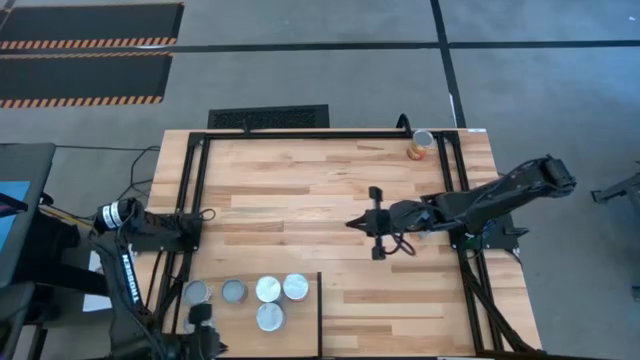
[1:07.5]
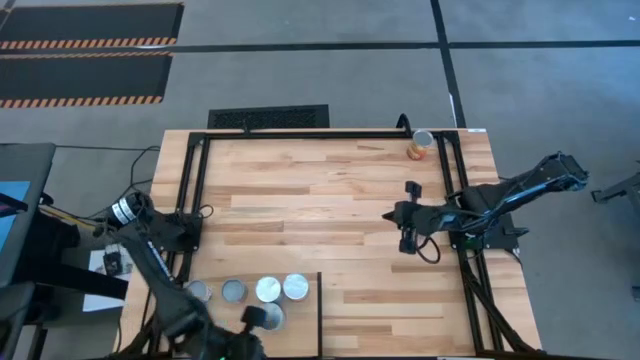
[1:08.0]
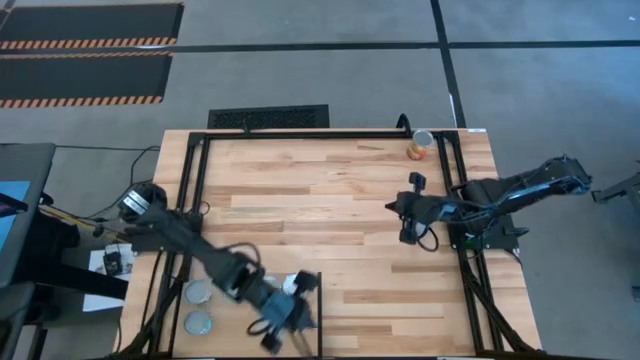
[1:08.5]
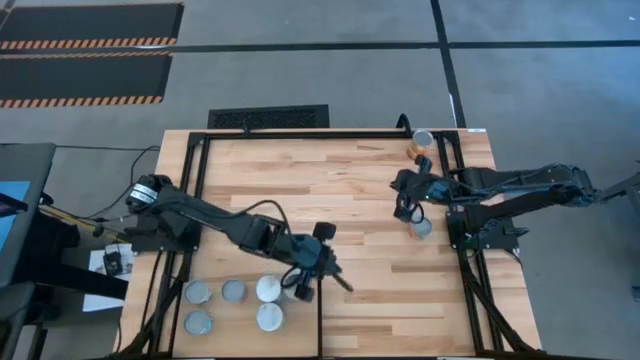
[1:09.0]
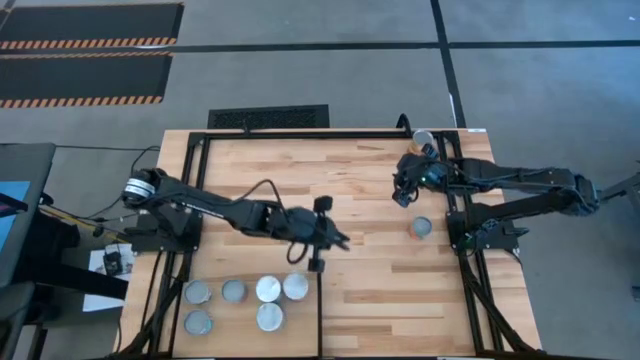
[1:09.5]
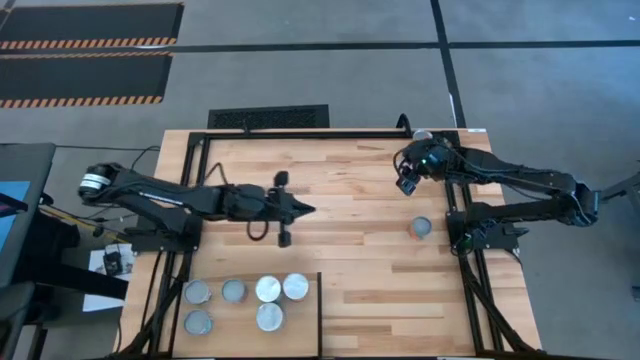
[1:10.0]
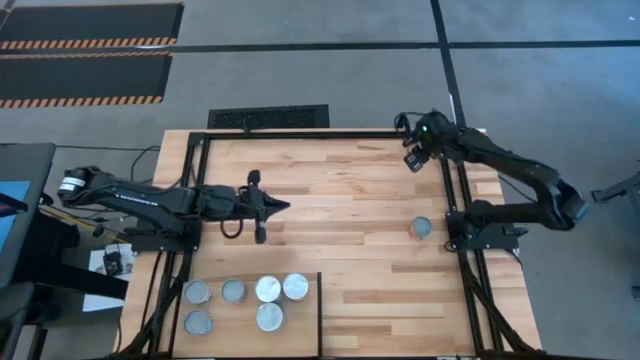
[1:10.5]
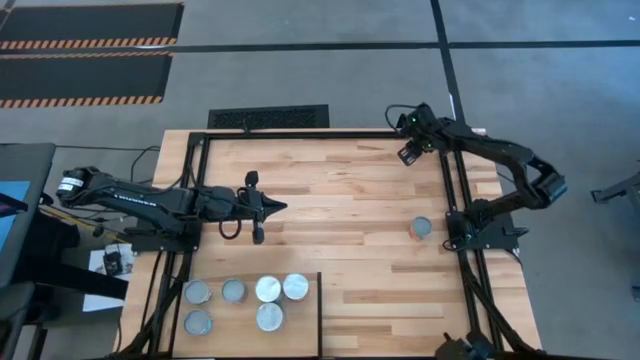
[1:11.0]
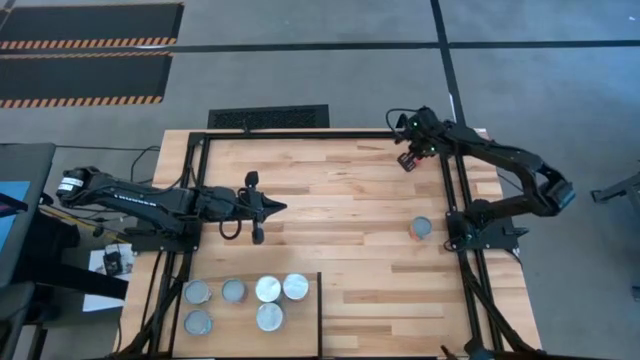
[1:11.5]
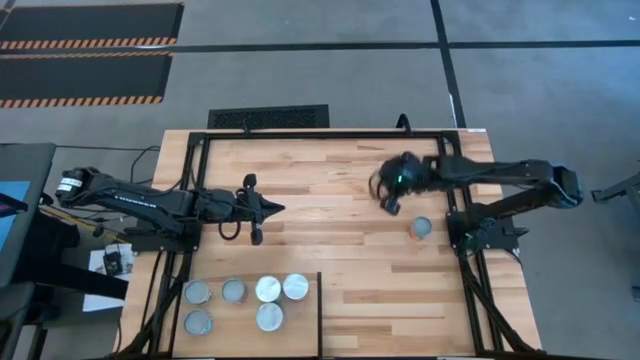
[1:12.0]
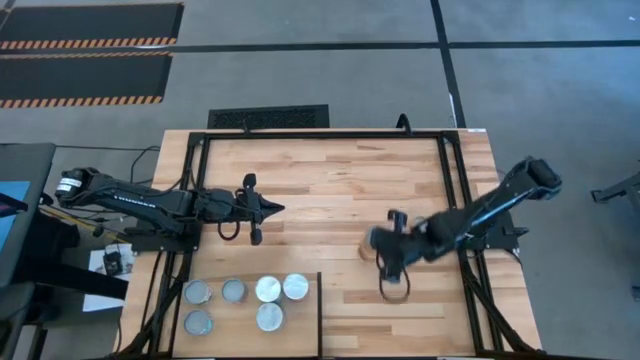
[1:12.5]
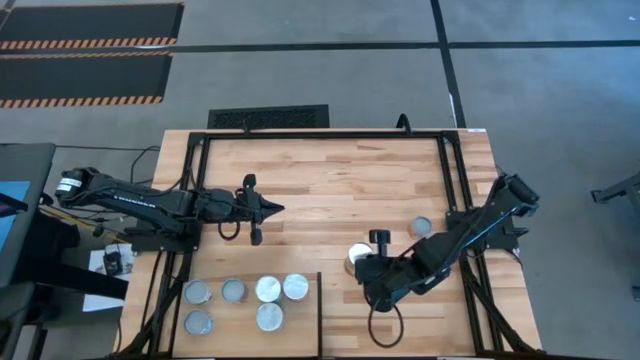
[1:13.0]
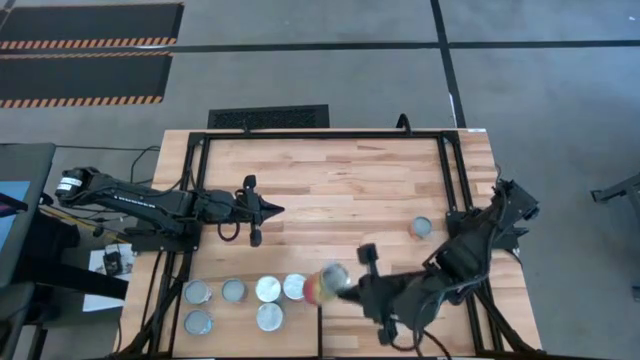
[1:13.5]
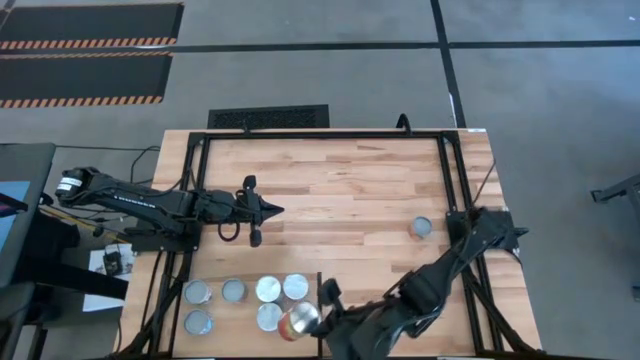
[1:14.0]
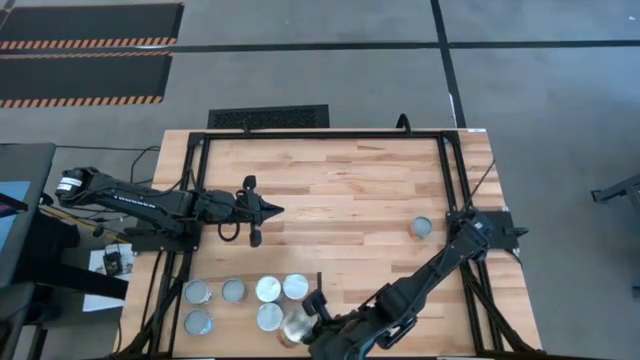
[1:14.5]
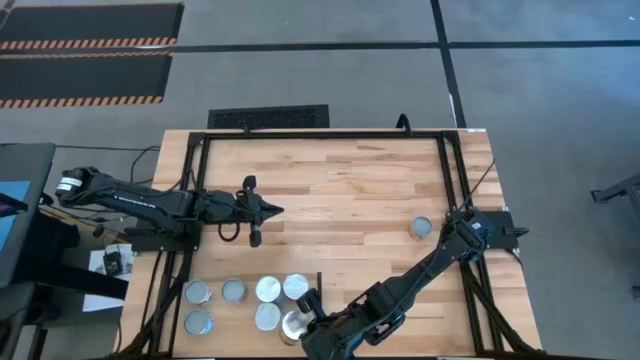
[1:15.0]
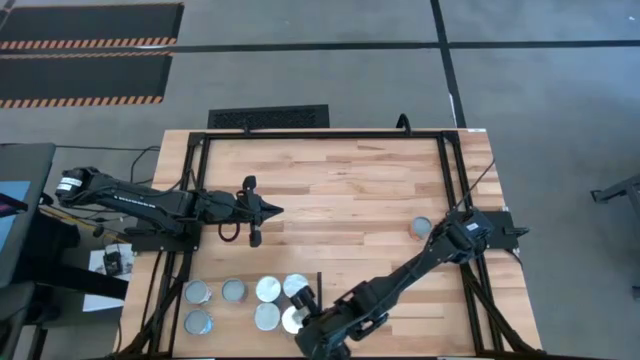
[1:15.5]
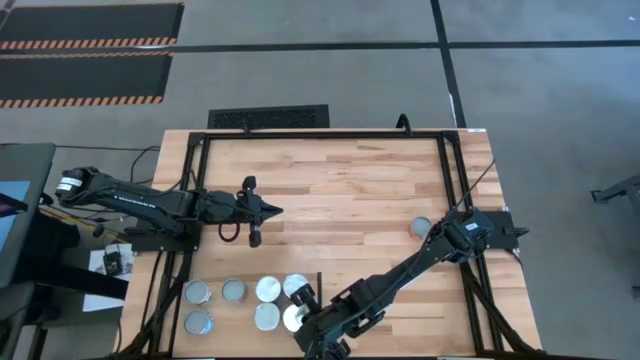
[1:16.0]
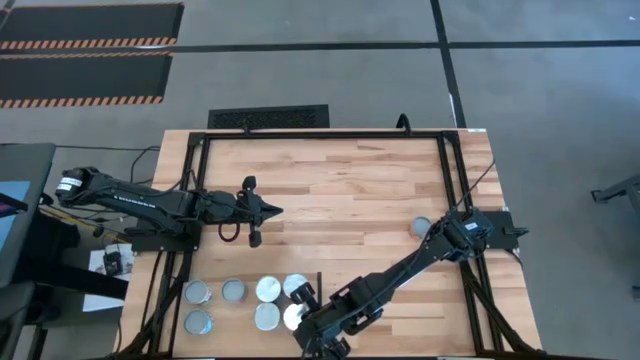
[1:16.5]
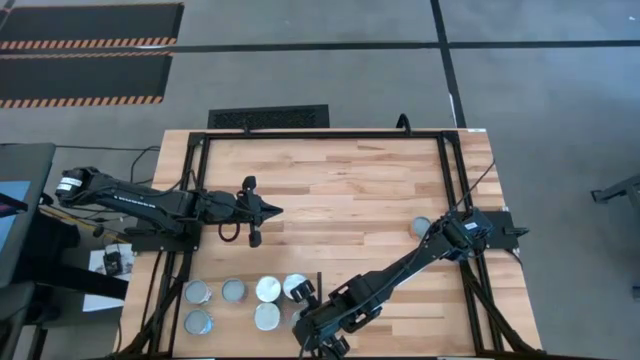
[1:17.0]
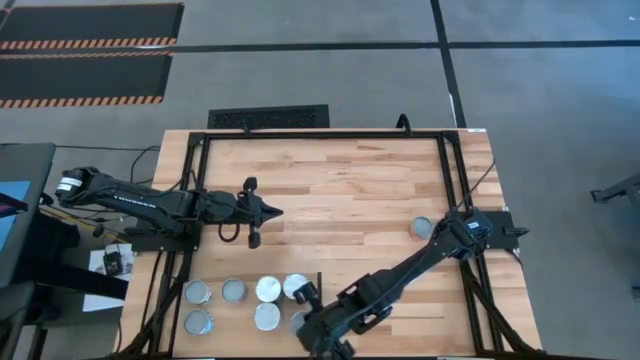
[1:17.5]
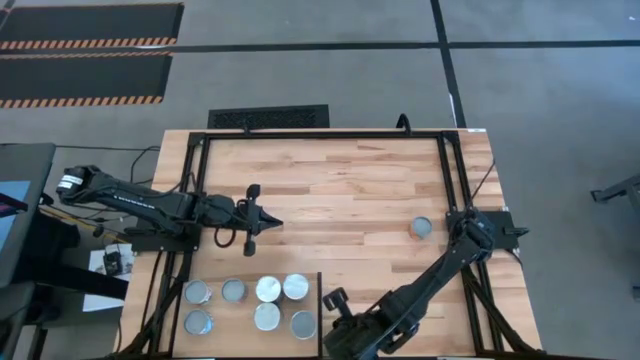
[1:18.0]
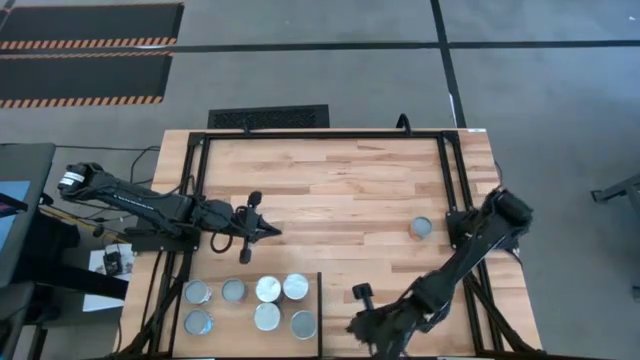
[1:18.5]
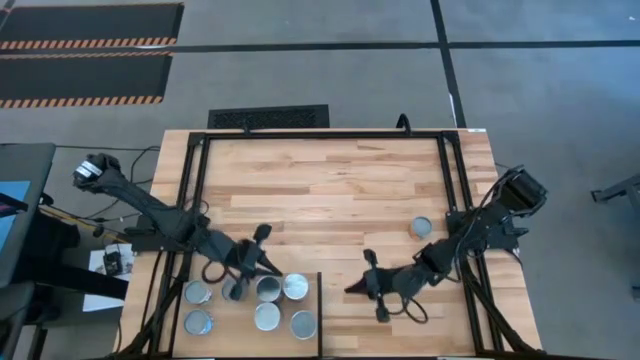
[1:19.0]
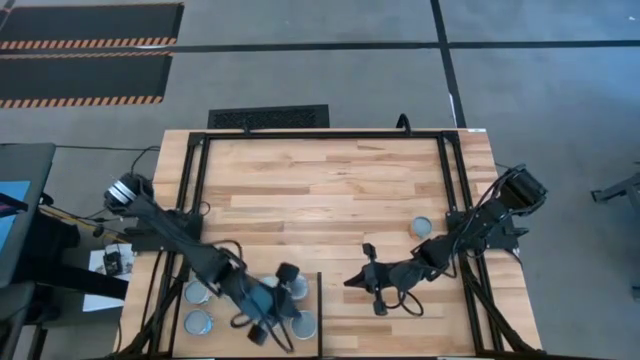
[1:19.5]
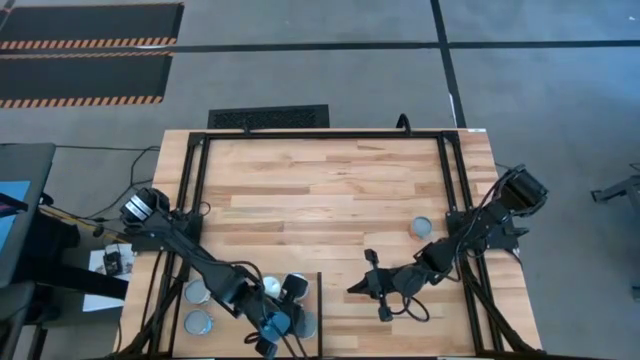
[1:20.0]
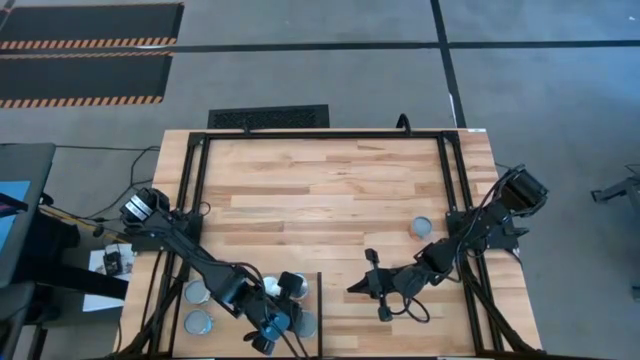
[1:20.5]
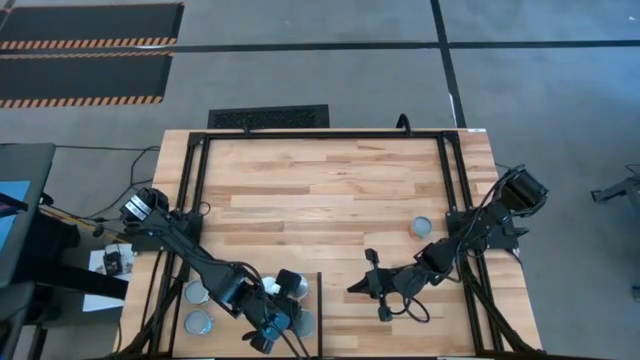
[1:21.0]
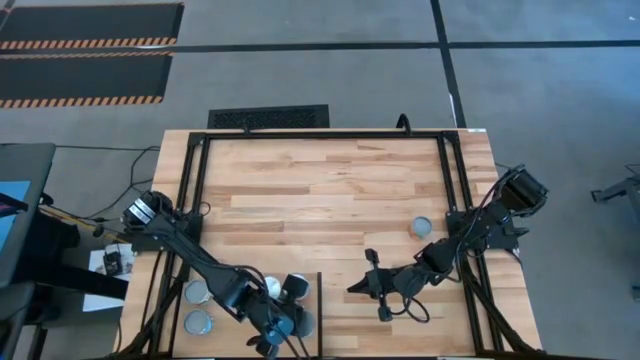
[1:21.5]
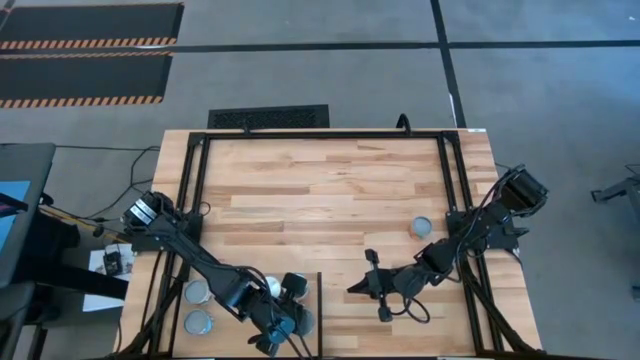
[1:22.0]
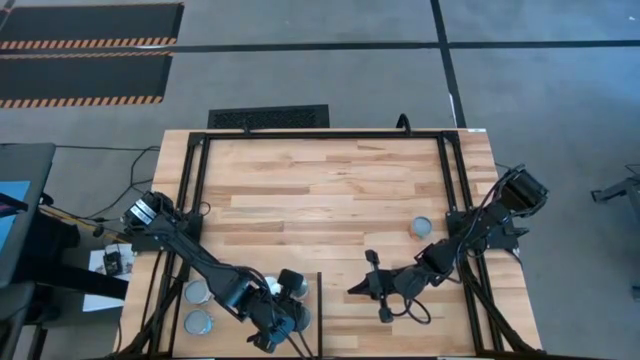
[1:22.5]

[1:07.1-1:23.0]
Task: Pick and place cans onto a shelf
Put the canned corn on the shelf

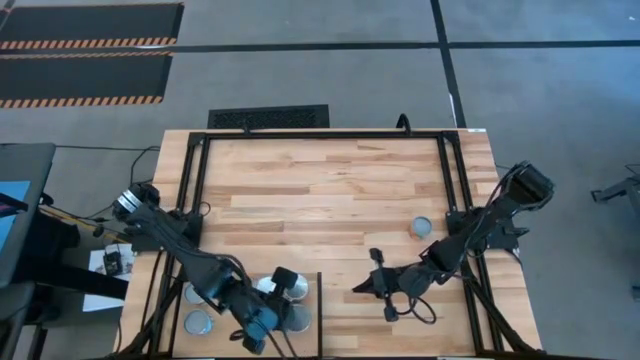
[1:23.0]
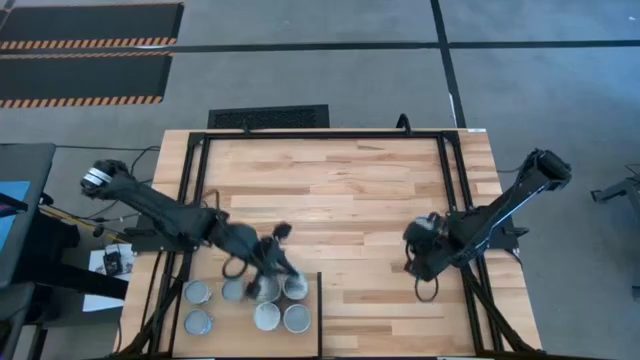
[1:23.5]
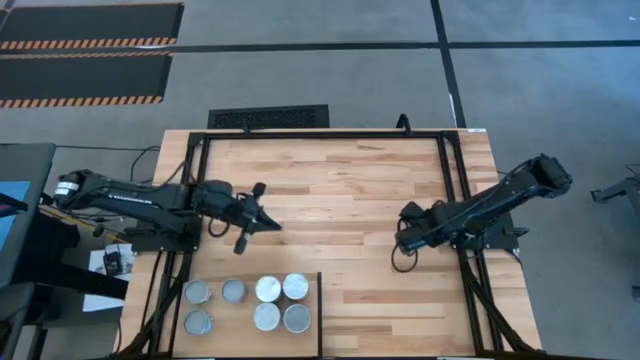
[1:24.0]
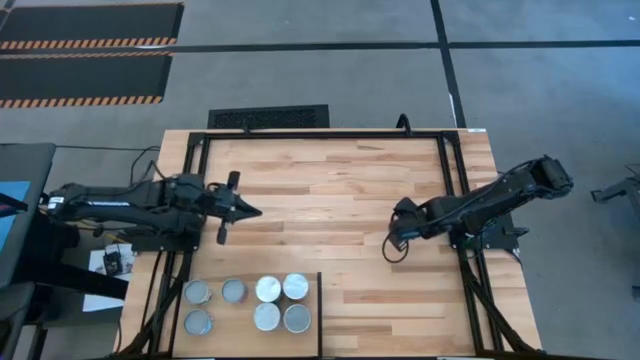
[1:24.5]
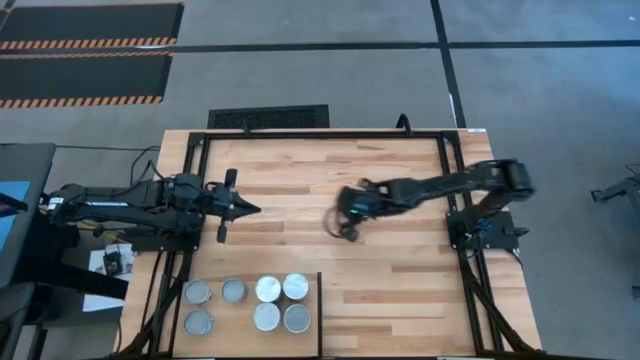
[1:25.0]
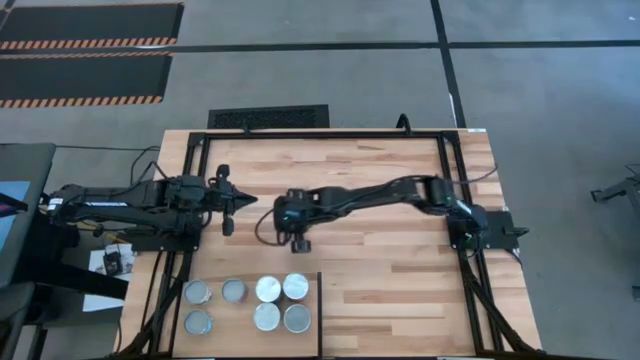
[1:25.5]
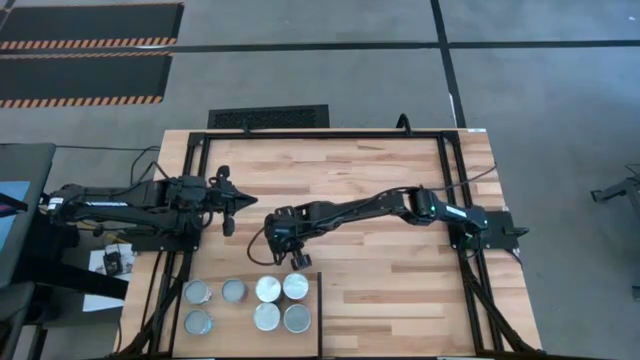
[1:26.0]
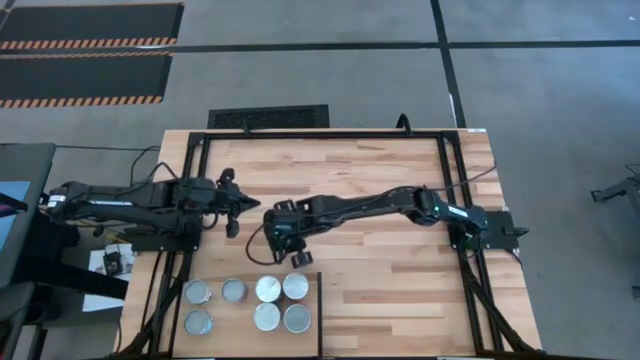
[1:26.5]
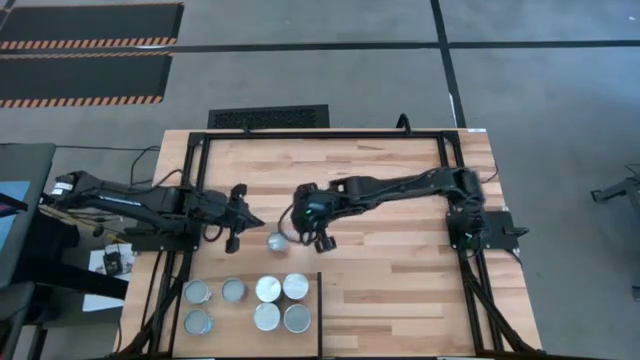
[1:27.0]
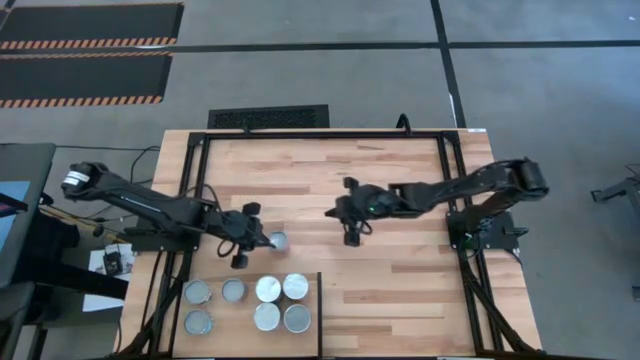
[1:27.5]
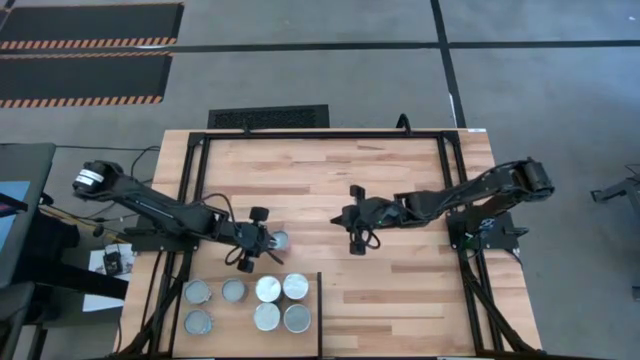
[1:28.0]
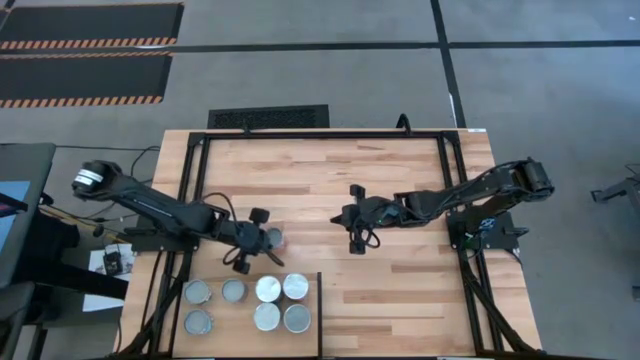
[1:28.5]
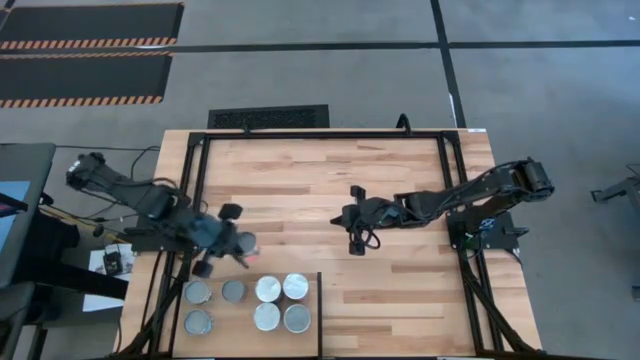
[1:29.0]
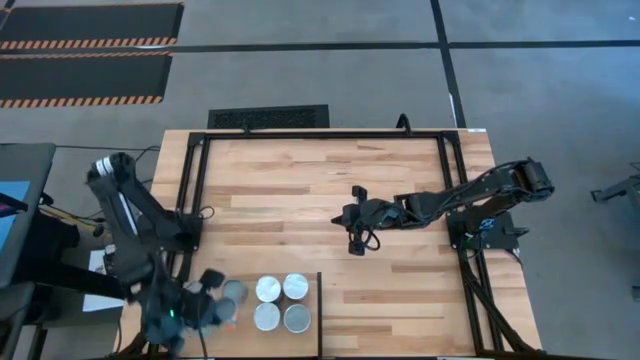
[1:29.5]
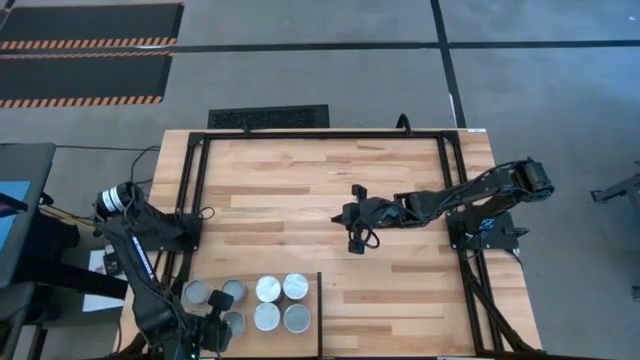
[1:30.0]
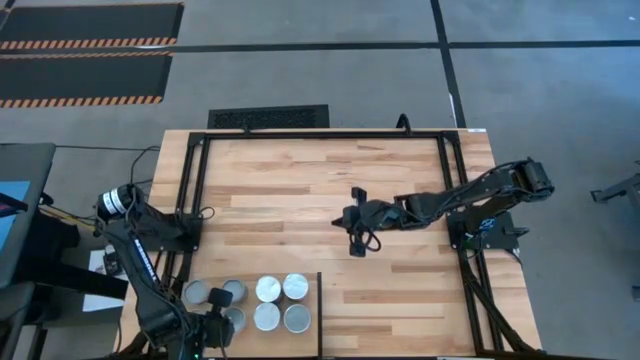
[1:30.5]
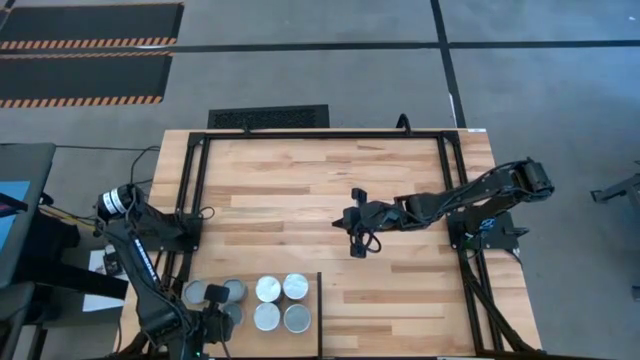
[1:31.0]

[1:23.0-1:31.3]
Put the canned oranges on the shelf
